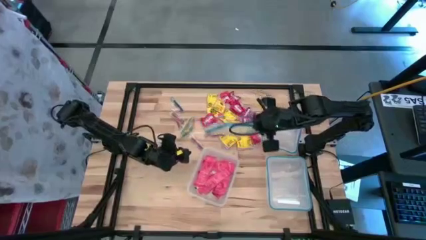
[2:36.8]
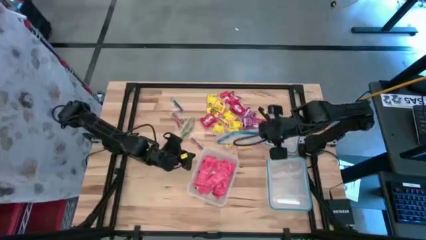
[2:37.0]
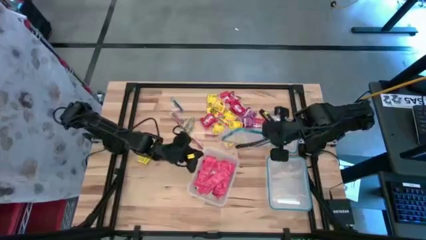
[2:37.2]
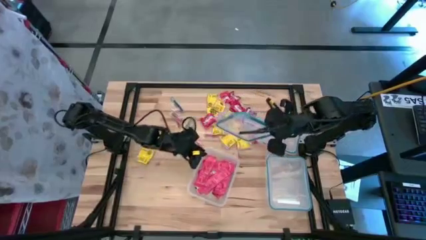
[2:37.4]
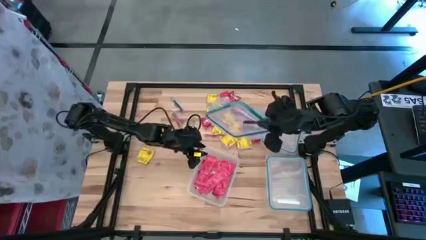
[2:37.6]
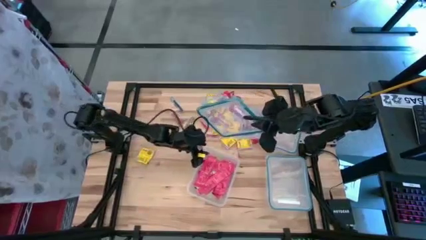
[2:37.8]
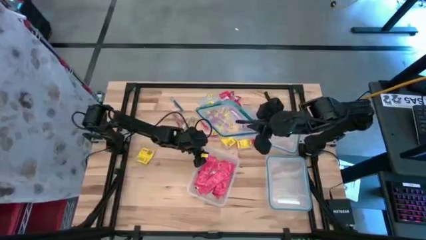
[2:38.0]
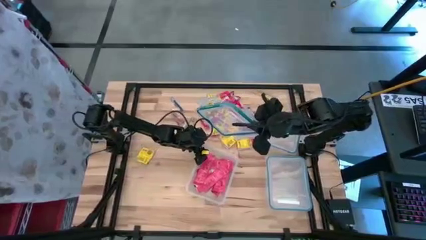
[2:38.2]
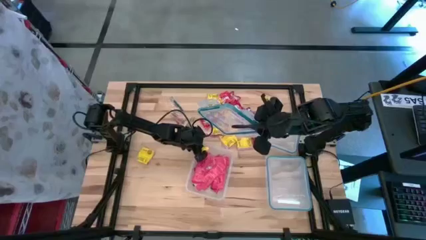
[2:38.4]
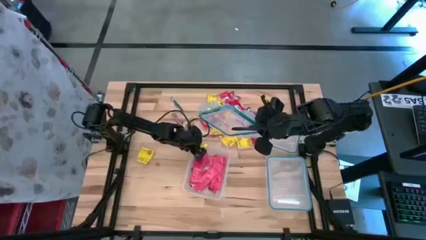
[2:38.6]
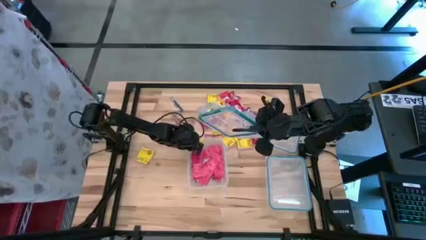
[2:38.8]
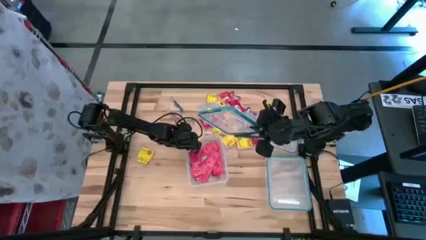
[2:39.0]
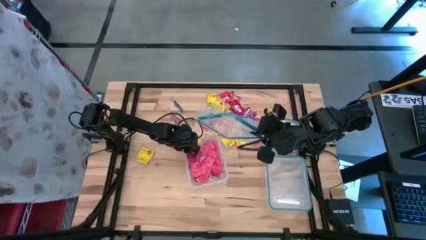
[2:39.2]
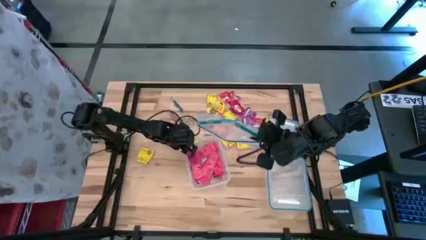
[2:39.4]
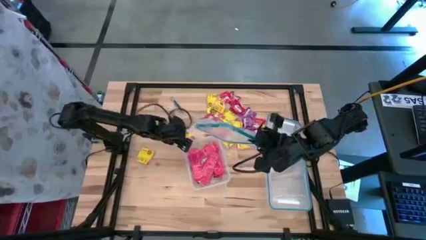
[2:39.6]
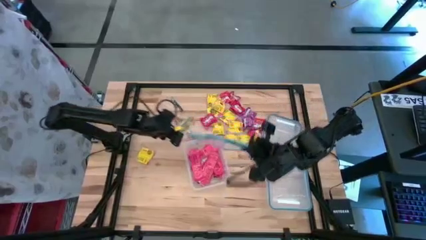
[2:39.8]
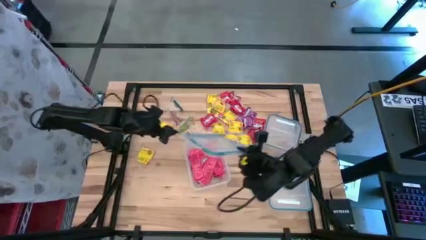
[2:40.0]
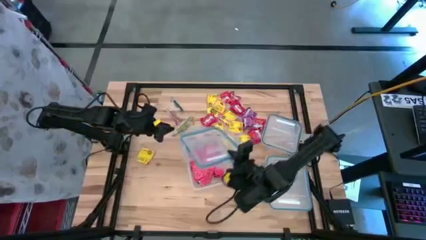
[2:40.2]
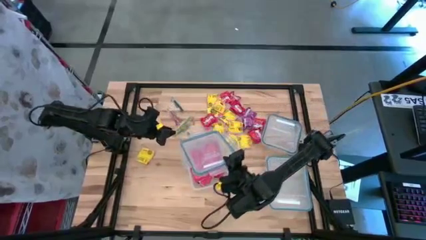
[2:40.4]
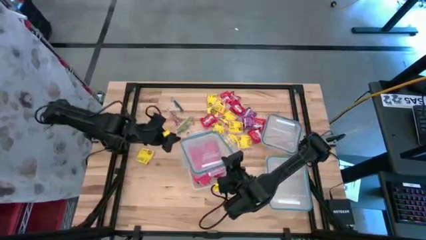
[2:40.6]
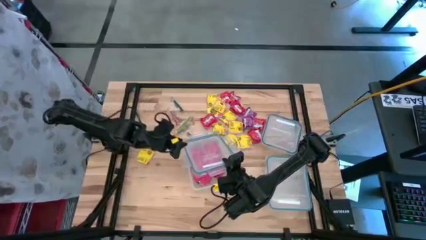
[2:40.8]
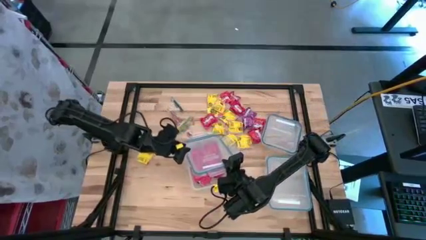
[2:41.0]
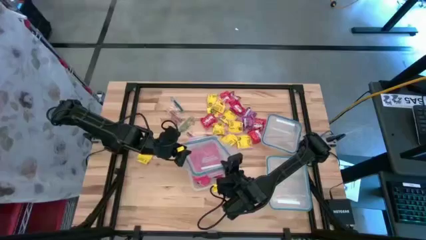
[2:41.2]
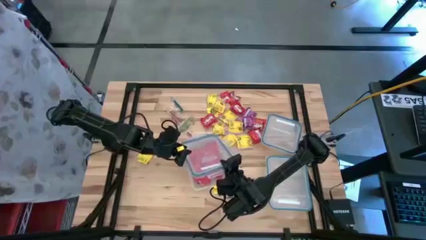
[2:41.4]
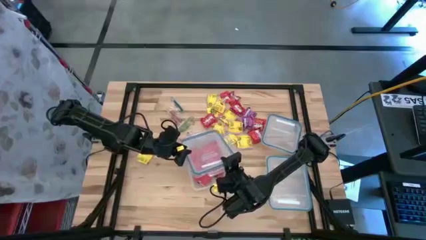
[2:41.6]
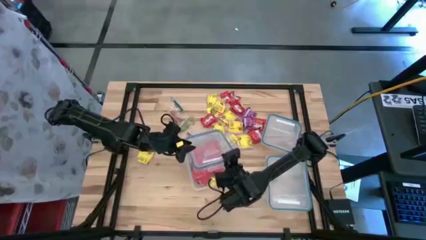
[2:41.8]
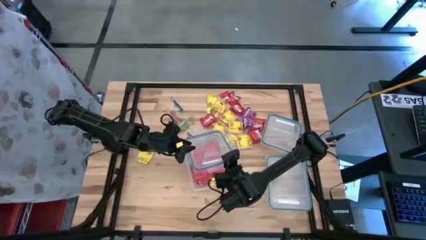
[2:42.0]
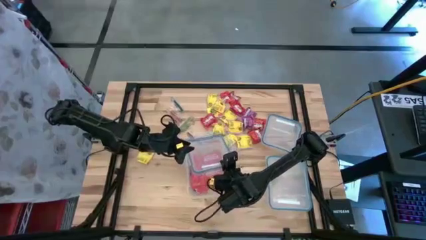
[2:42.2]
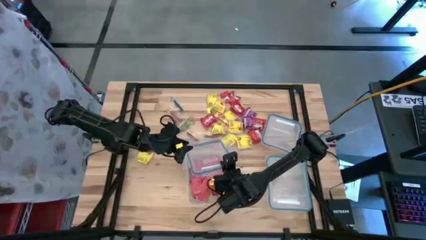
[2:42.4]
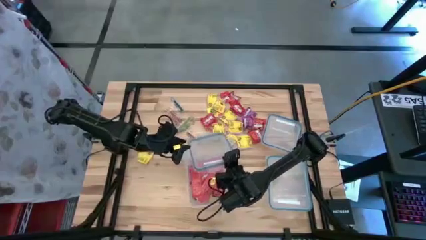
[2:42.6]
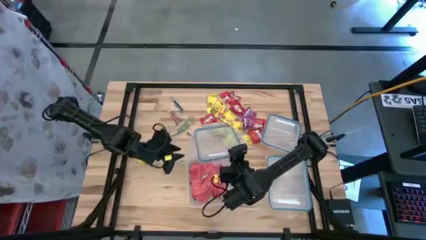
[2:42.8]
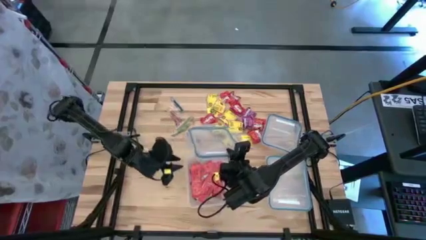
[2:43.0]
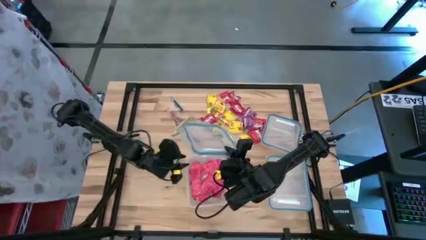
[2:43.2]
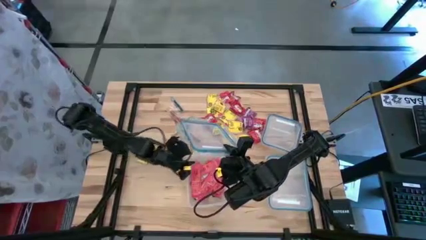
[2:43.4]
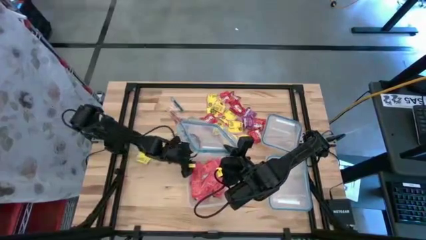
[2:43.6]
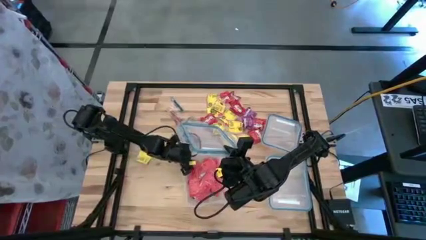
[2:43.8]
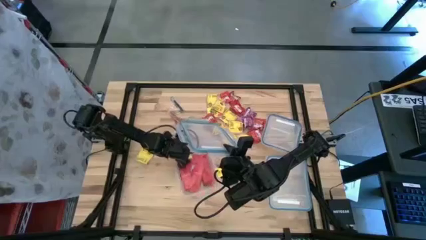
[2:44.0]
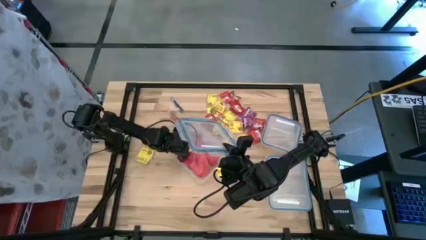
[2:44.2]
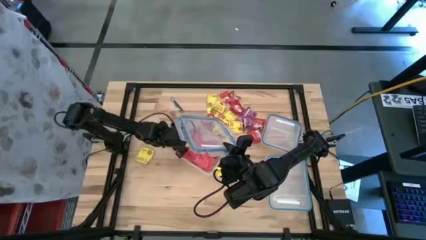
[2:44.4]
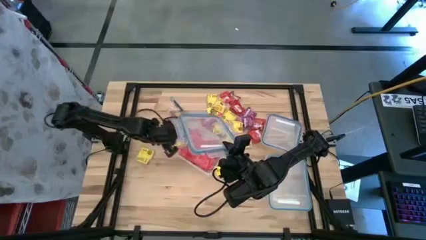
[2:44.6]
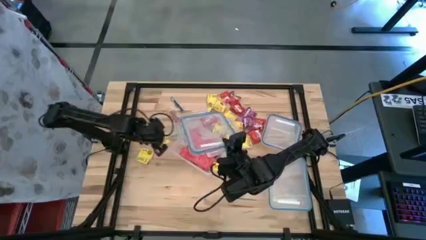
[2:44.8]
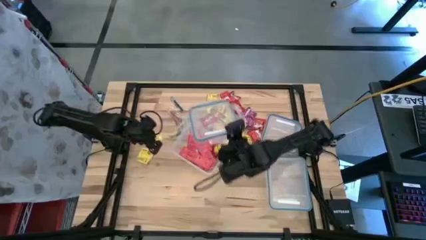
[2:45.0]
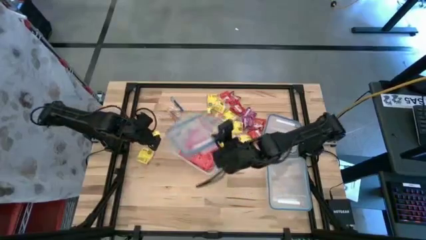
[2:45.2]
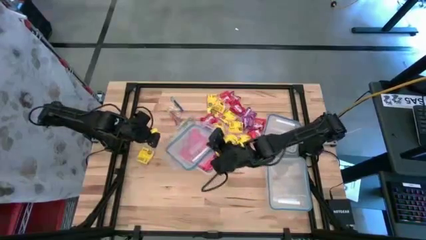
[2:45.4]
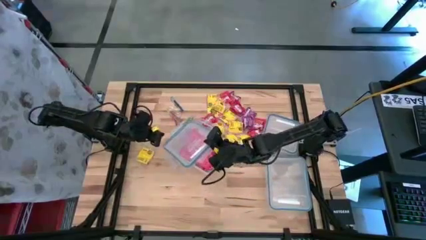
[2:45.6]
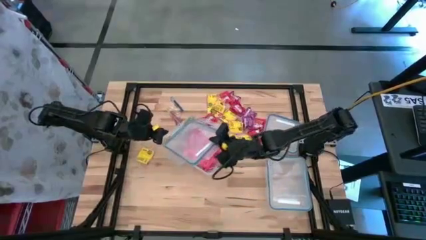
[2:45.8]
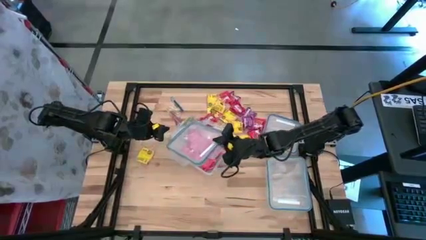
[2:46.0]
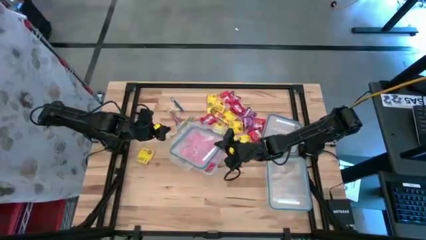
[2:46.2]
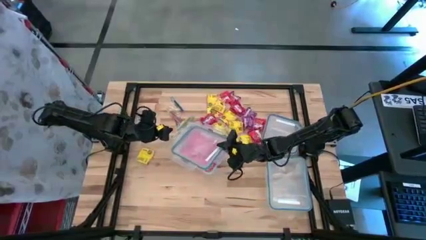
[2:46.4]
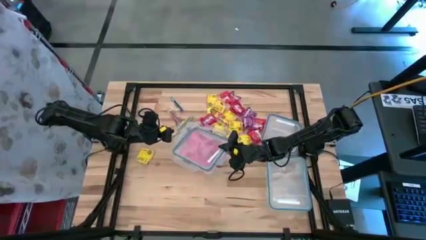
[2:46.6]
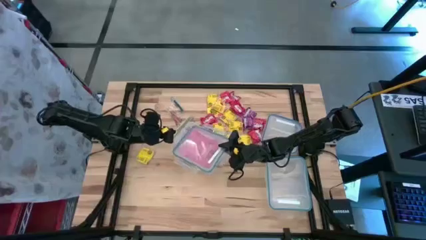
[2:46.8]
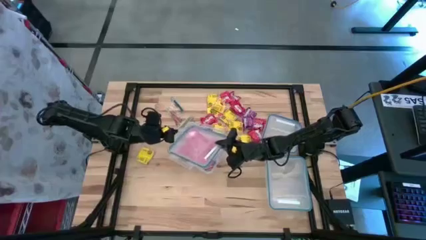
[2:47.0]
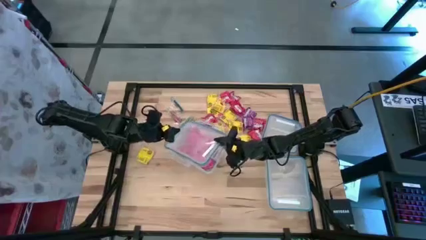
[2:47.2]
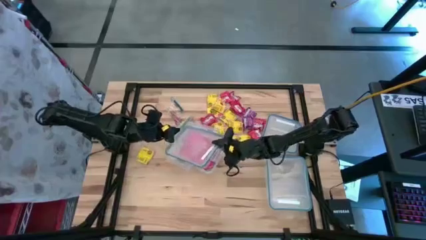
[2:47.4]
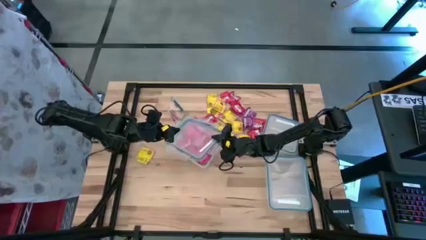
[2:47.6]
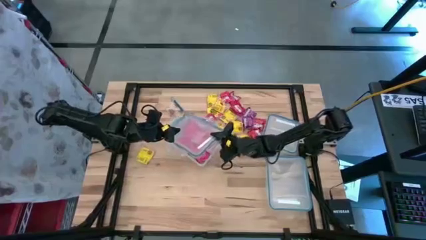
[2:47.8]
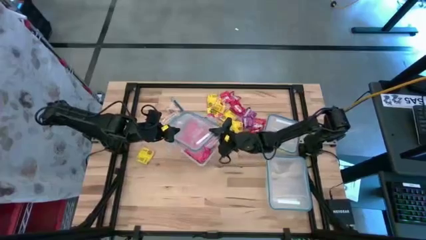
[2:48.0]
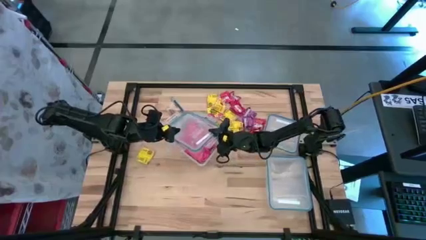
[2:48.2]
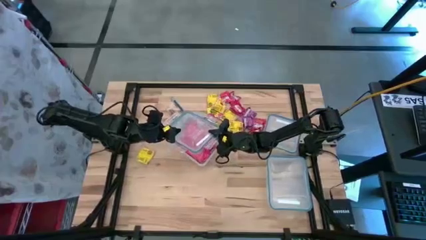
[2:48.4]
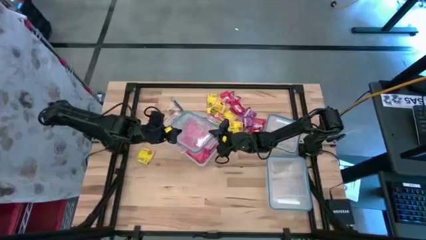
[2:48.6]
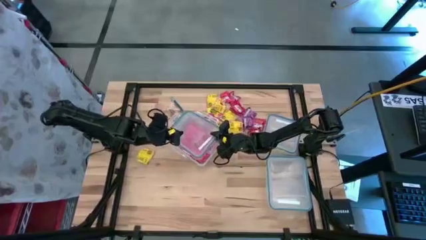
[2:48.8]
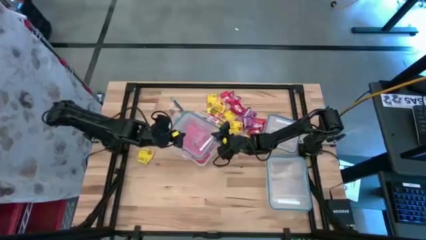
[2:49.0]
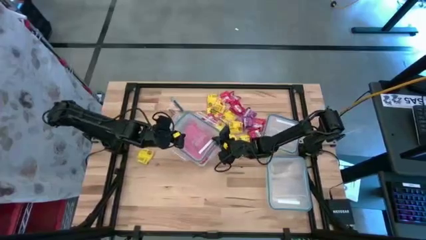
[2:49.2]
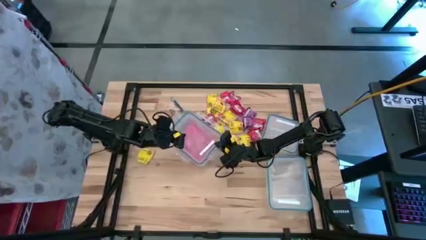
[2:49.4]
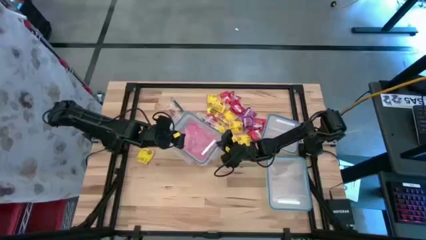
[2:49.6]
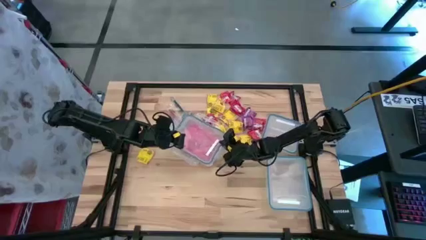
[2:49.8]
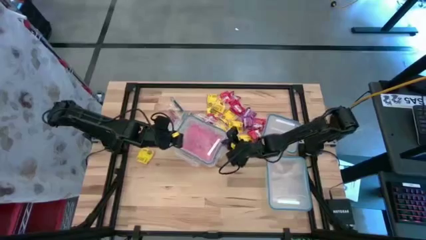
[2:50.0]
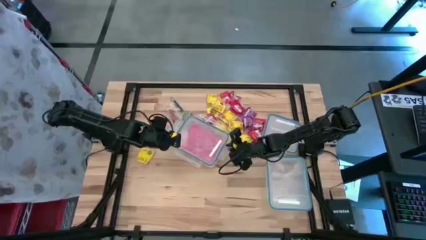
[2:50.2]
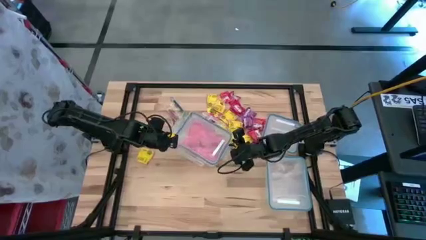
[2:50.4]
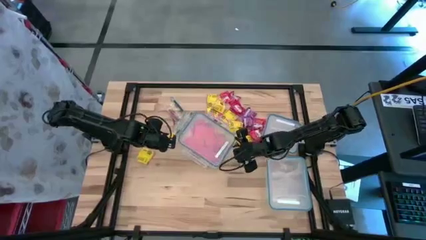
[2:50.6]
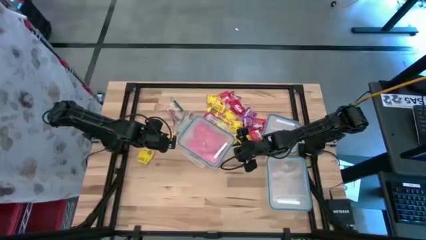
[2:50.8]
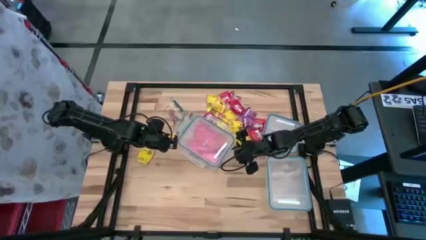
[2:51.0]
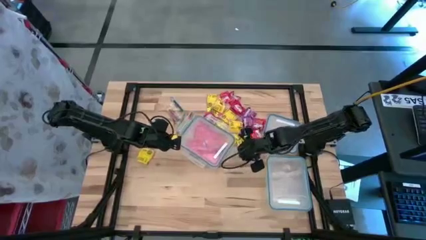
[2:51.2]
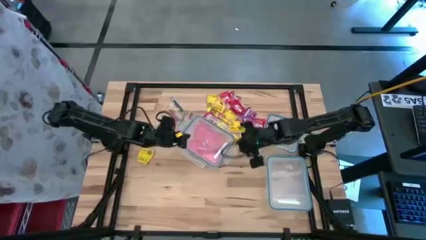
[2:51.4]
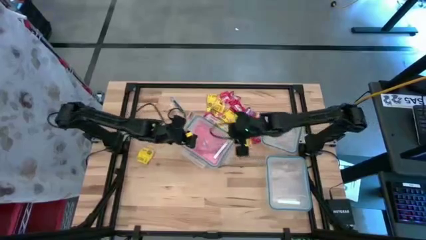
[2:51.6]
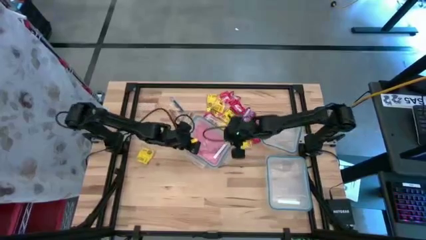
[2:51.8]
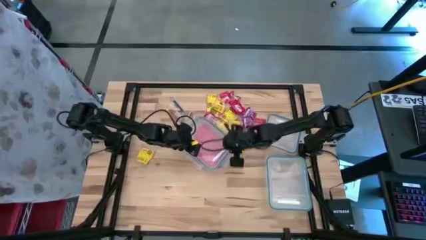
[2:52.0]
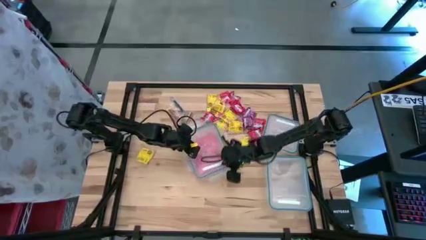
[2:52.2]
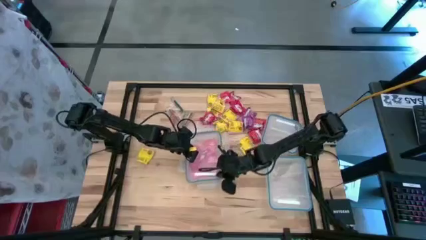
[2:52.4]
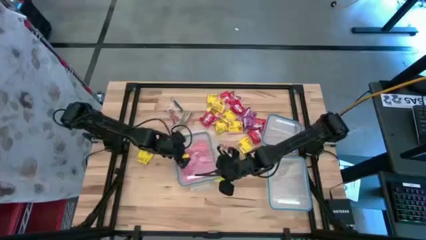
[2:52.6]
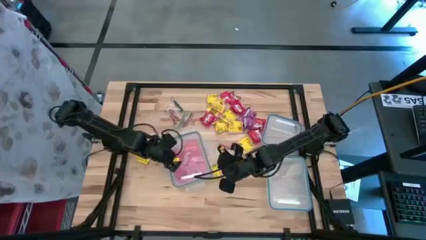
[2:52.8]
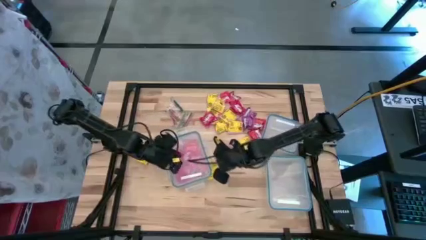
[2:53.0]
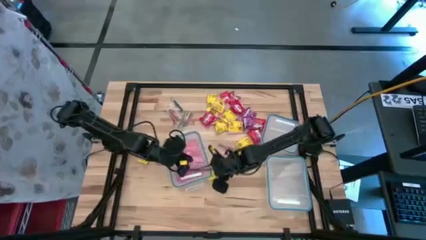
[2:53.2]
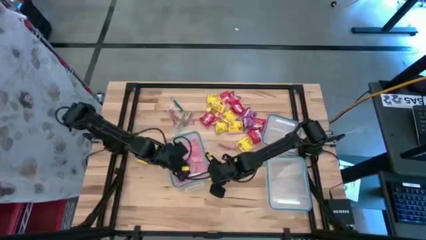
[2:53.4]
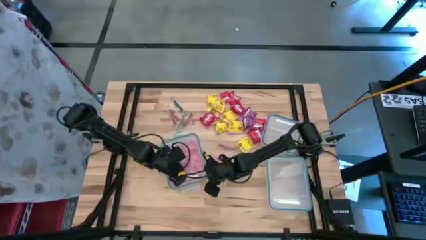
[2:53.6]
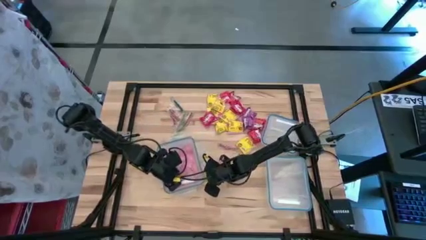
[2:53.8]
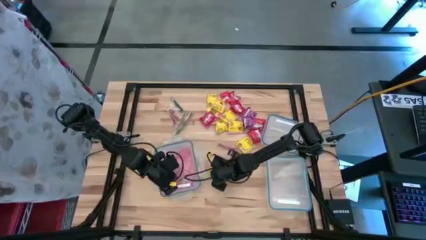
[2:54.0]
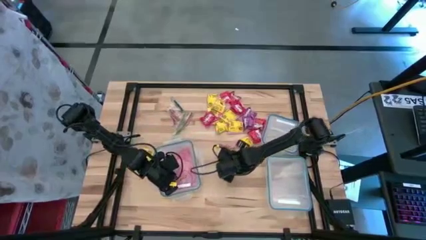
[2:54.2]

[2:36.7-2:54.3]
Task: Sort candy
Close the rectangular transparent bin
